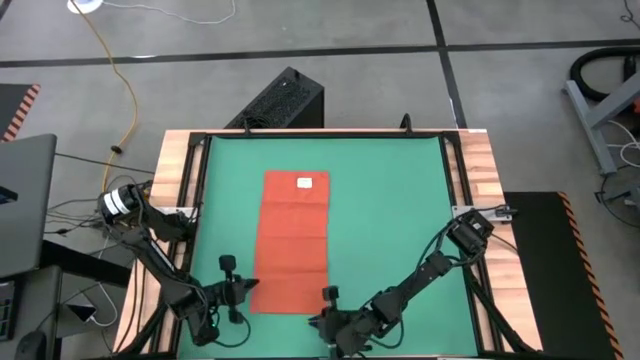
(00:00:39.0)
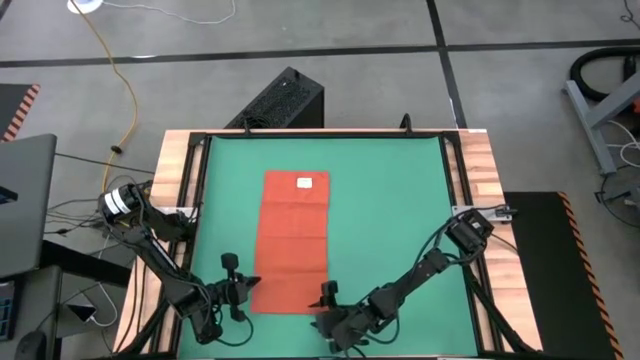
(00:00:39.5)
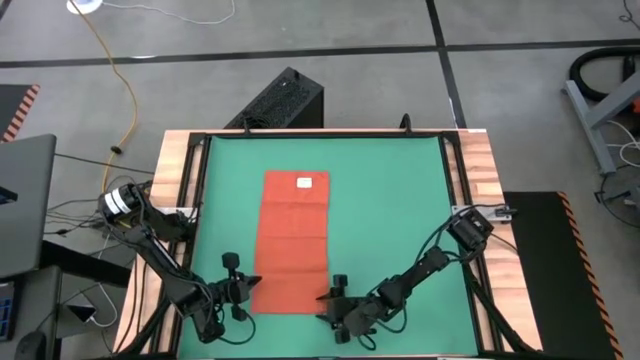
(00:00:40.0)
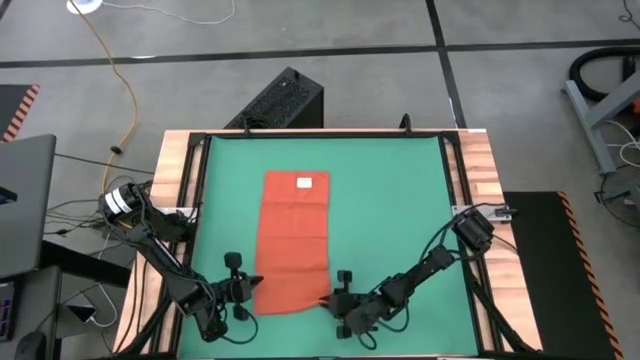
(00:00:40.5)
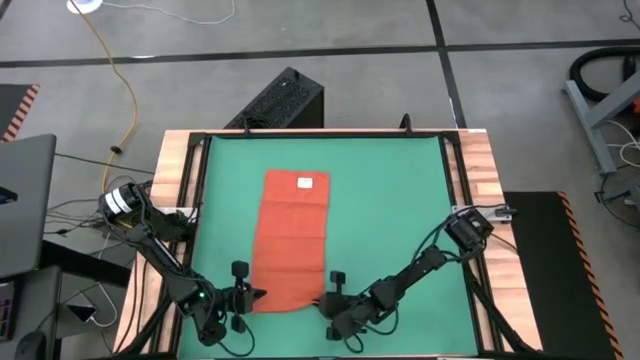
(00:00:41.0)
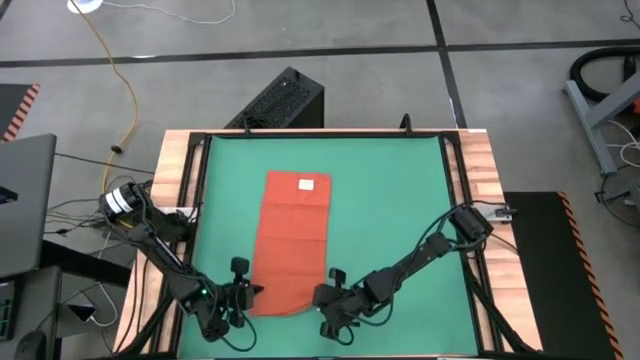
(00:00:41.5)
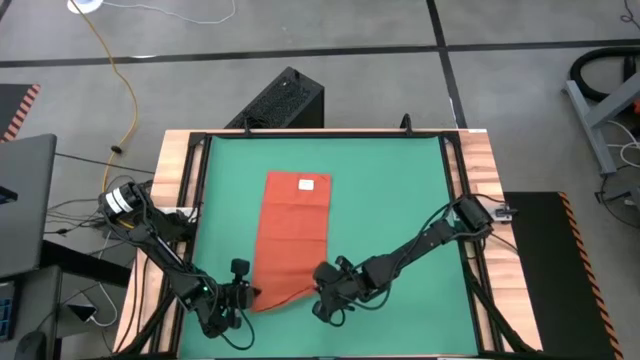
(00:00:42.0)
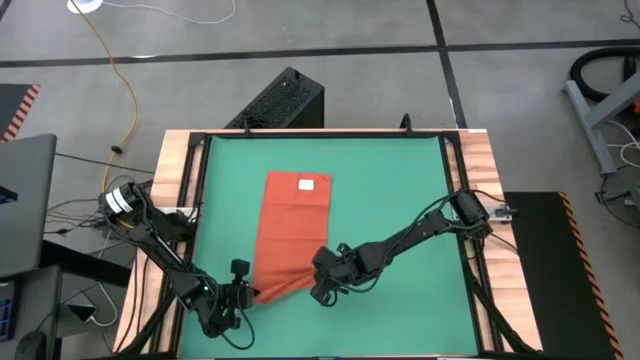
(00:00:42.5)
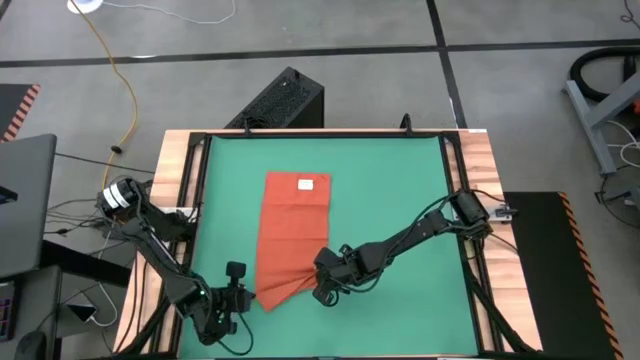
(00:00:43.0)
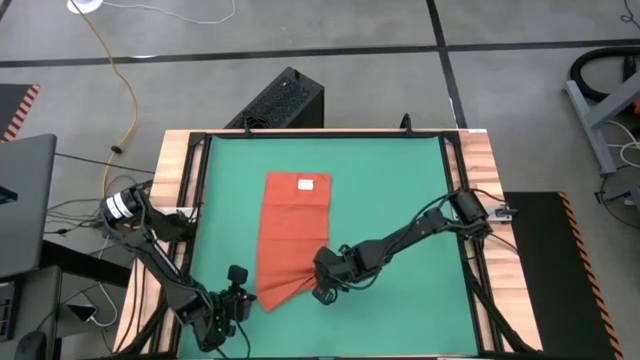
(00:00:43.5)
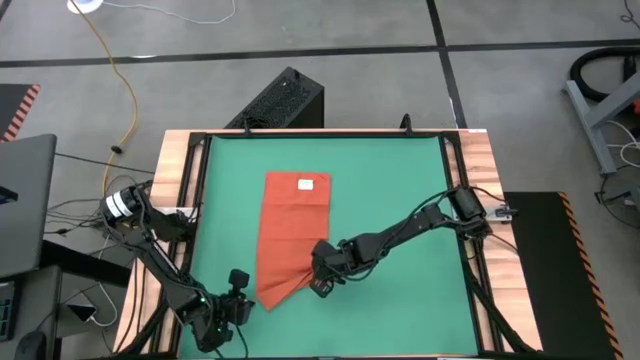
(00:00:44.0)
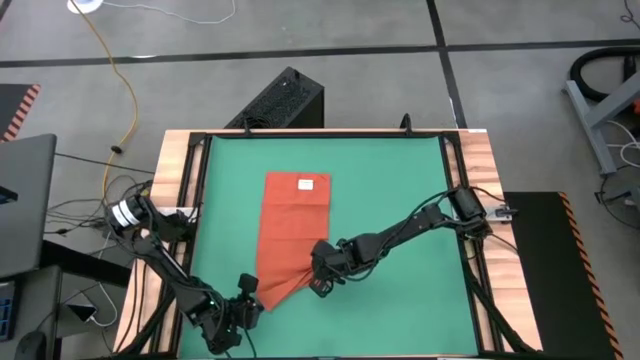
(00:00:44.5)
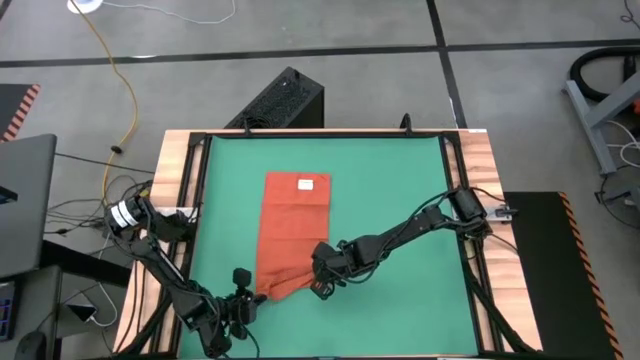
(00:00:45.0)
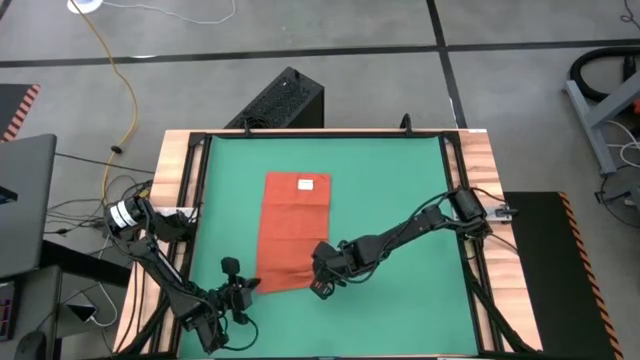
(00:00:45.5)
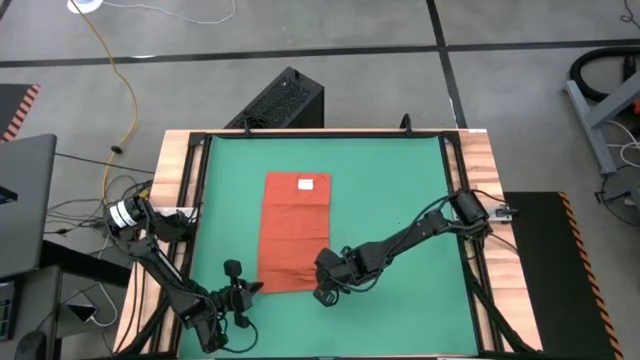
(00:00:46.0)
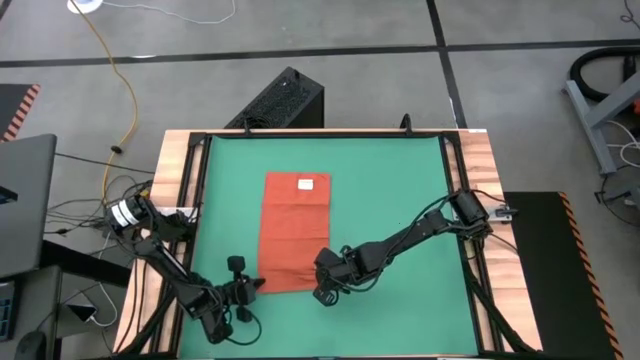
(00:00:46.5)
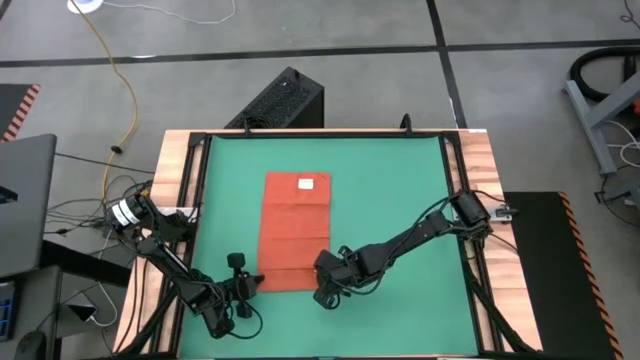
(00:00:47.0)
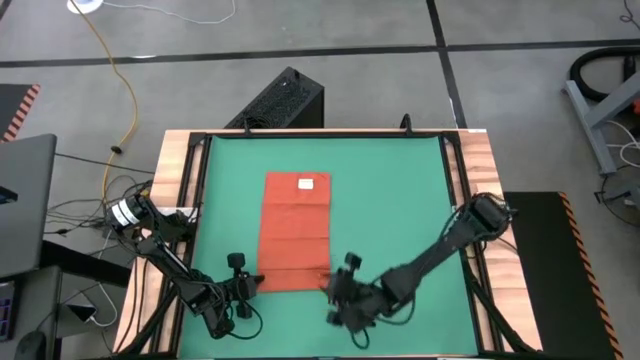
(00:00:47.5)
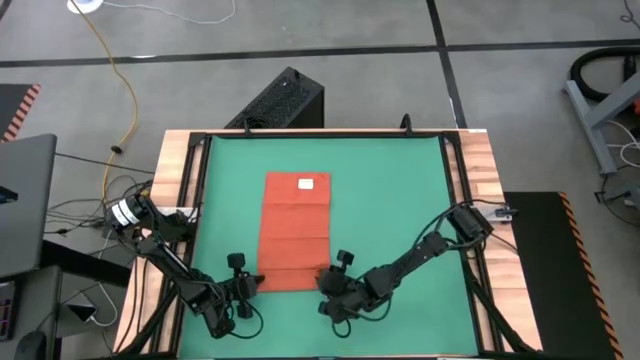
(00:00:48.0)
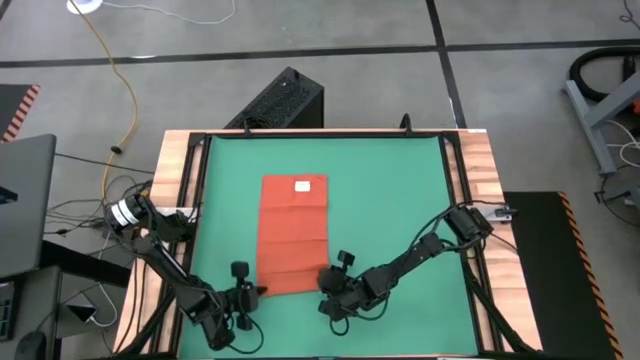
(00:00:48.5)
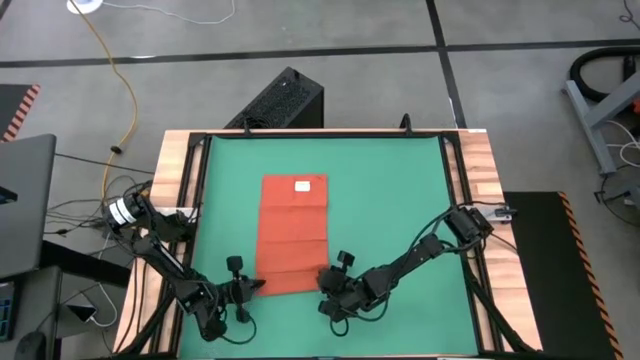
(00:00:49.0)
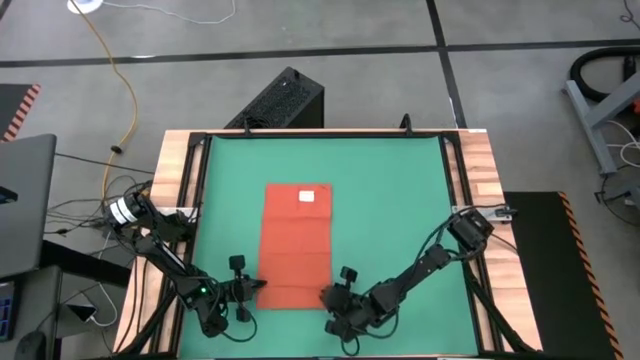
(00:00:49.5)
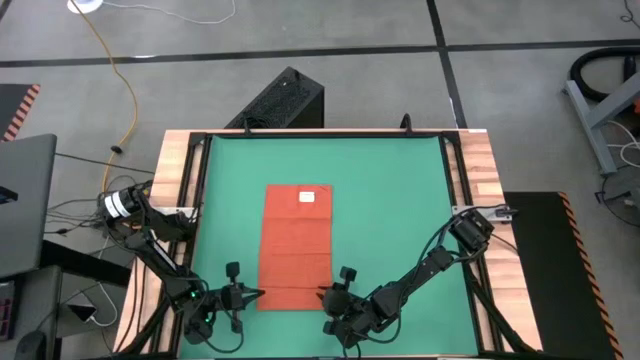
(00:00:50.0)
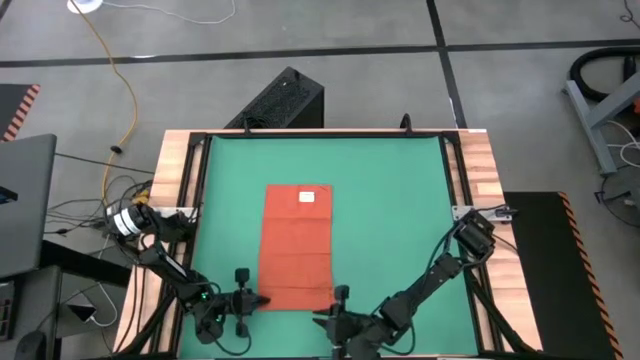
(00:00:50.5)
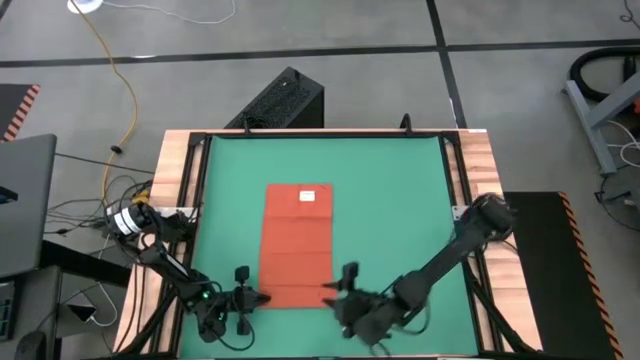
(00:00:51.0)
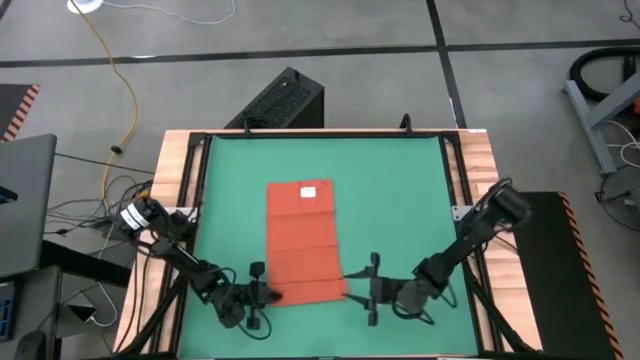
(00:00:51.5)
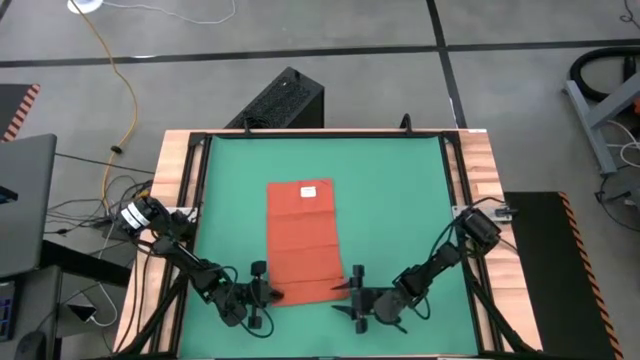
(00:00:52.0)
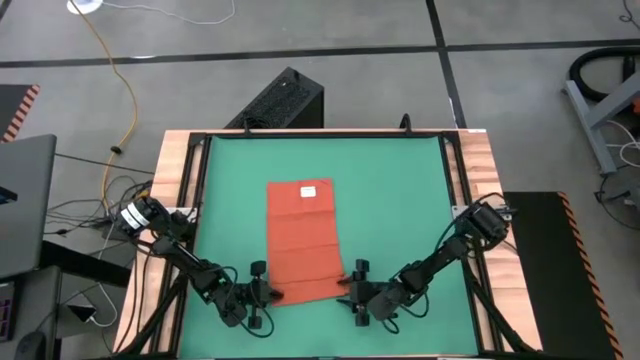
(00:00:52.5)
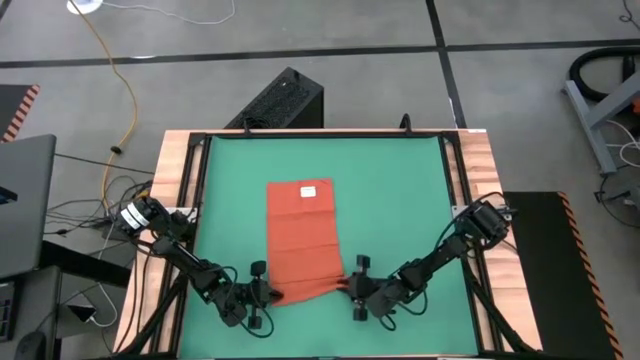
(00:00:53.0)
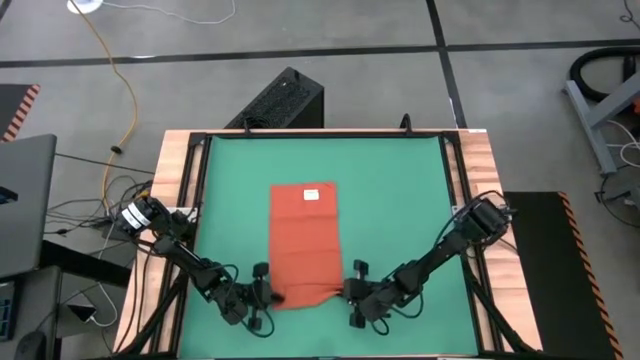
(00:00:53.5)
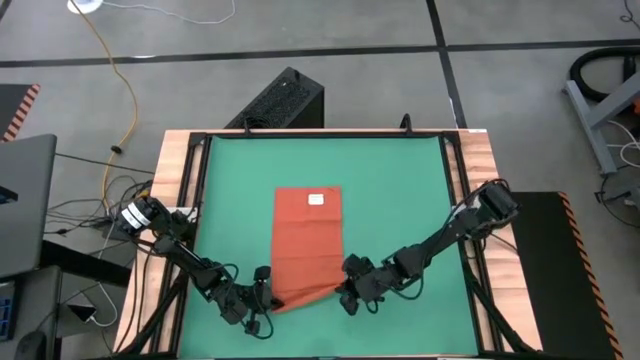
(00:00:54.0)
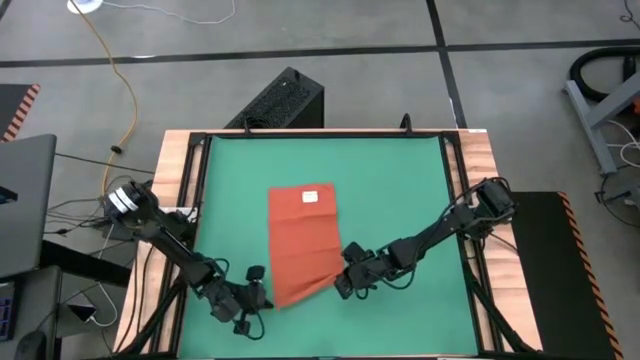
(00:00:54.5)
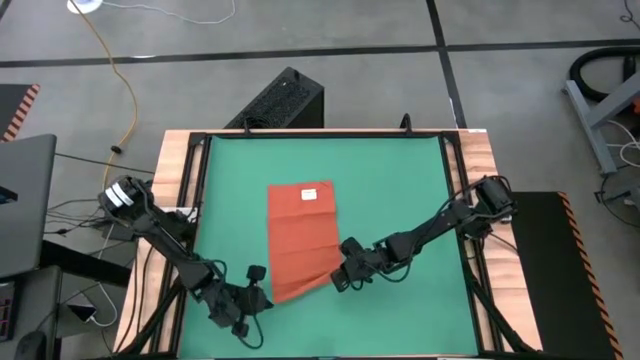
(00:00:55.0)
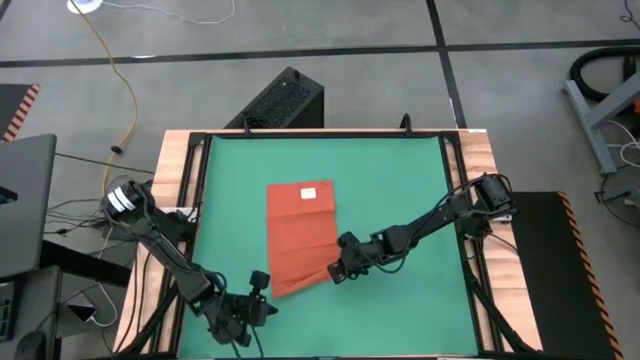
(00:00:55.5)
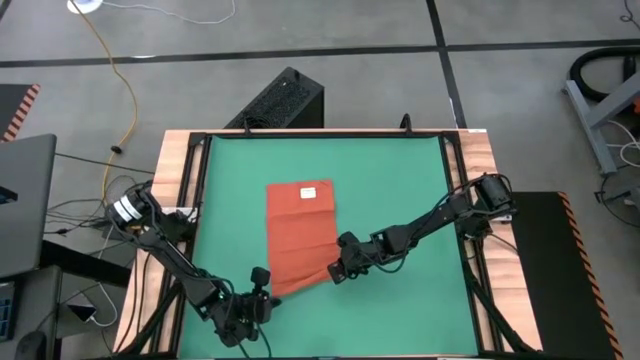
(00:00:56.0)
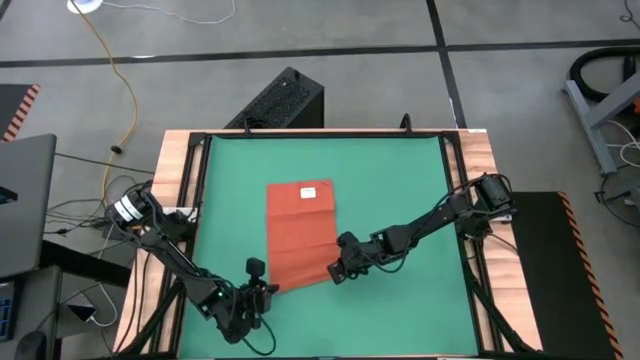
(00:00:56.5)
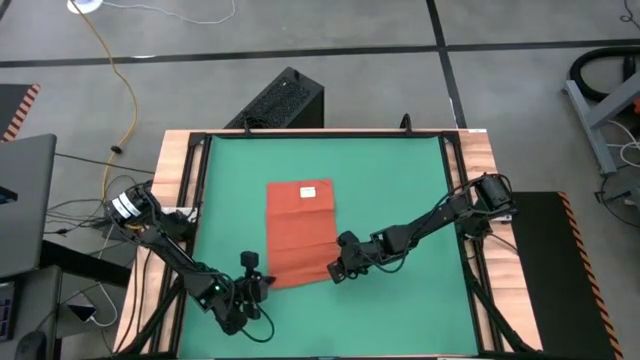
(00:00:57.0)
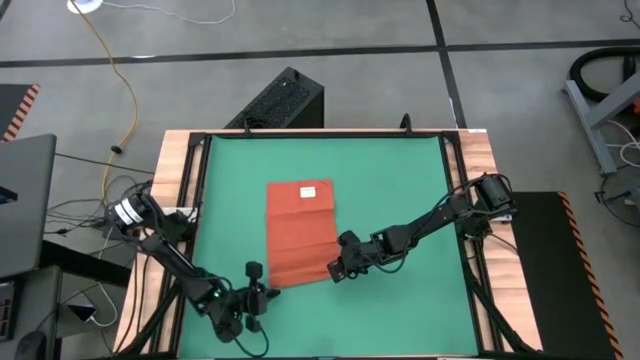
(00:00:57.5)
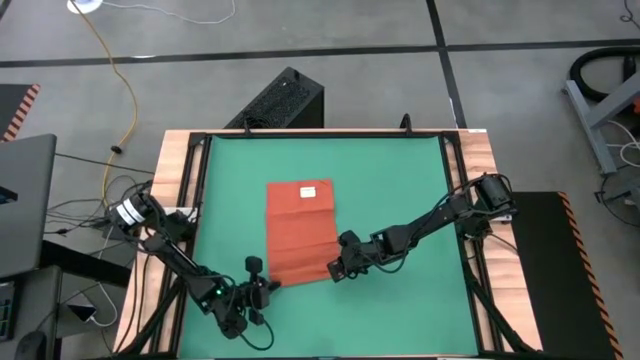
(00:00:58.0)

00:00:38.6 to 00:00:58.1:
Task: Roll towel
Roll the orange towel

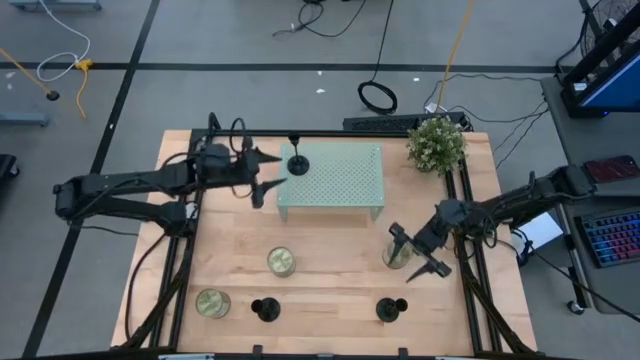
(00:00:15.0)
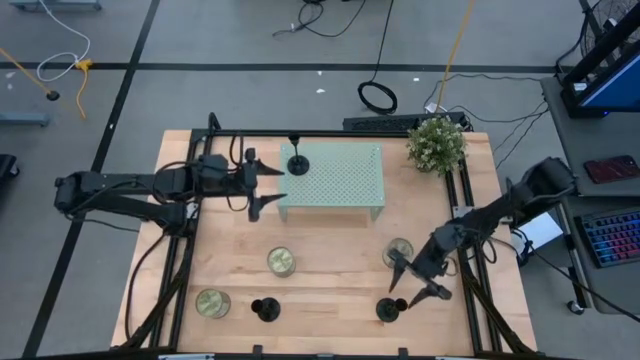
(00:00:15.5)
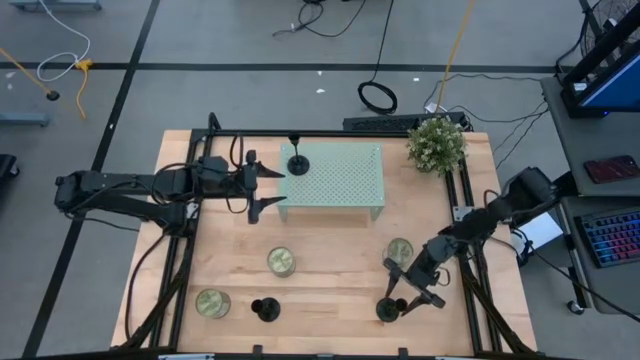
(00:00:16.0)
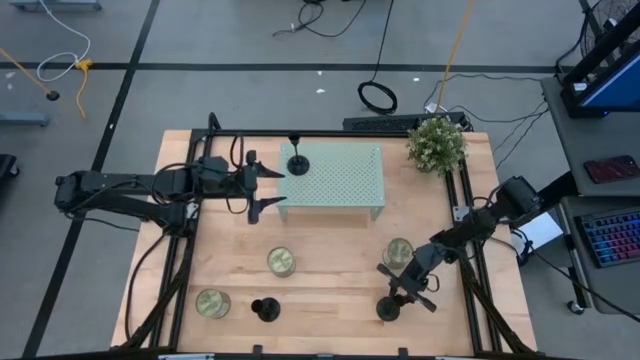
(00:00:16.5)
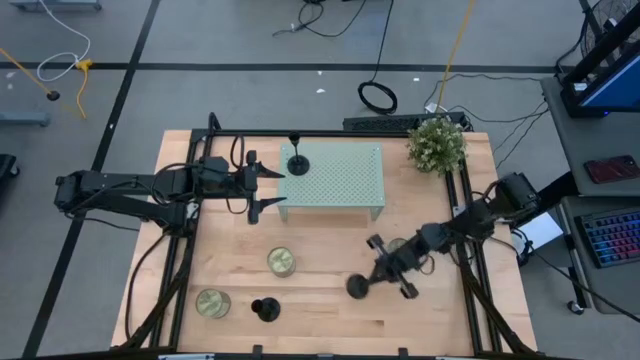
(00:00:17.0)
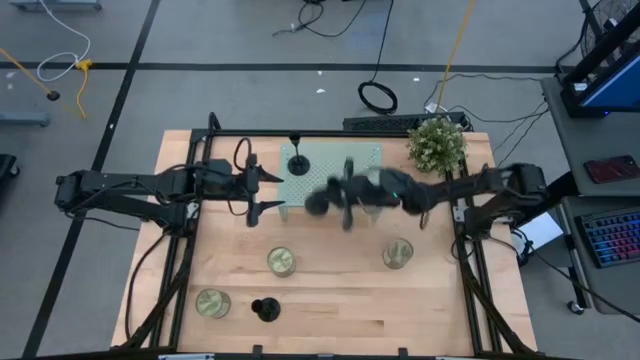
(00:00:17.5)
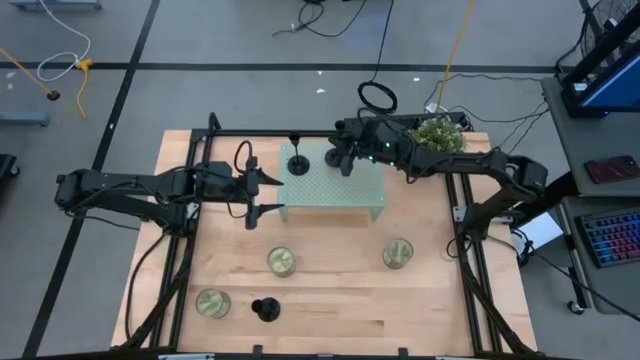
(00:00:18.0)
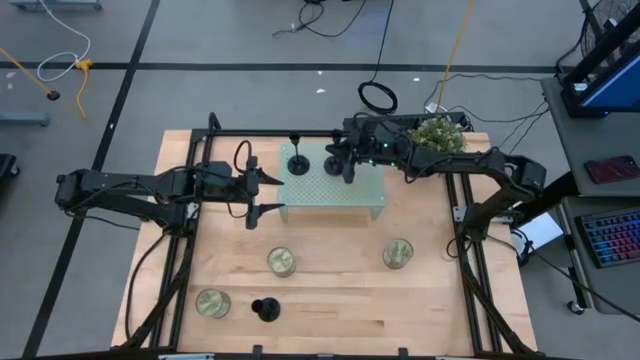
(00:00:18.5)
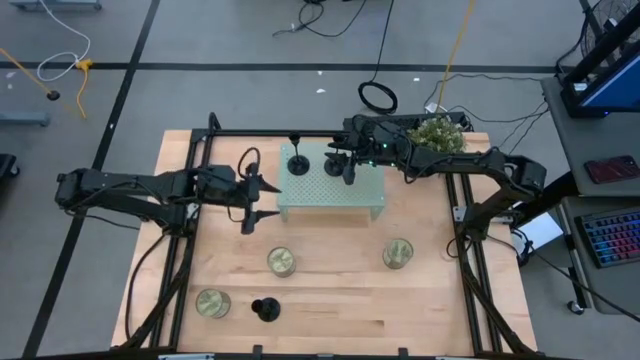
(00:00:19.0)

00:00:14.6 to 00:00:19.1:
Task: Stock candles and holders on shelf
Align the black candle holder on the shelf with the other black candle holder
